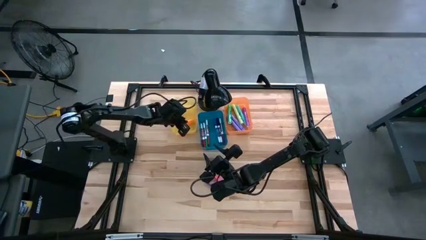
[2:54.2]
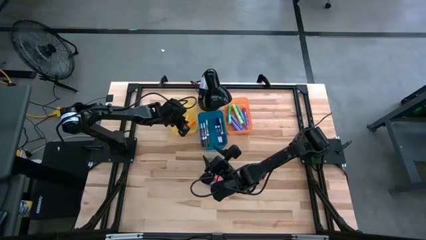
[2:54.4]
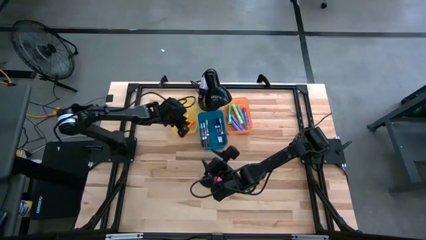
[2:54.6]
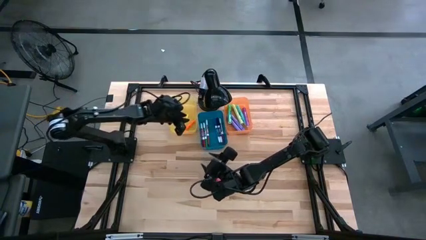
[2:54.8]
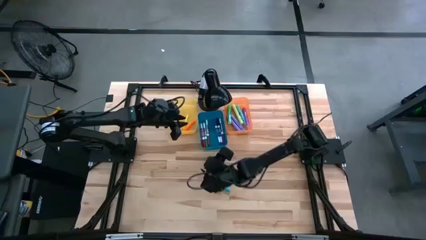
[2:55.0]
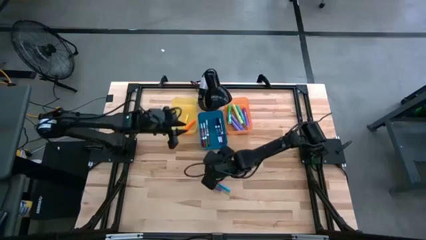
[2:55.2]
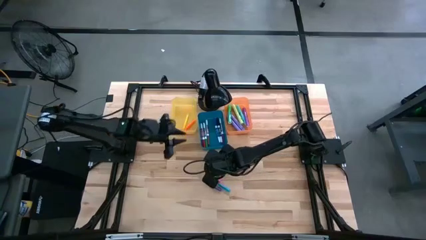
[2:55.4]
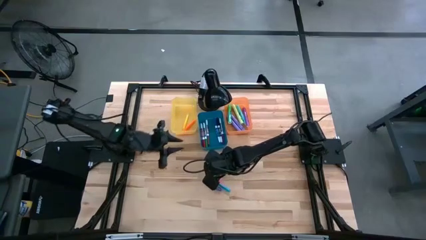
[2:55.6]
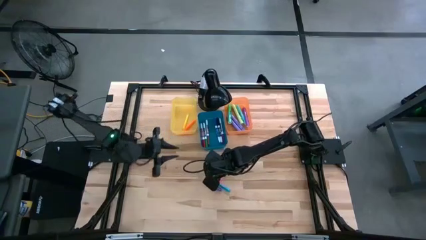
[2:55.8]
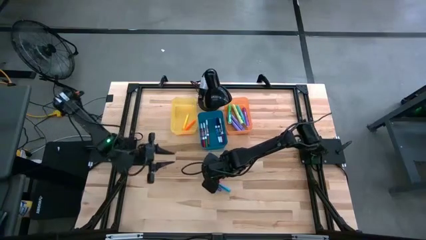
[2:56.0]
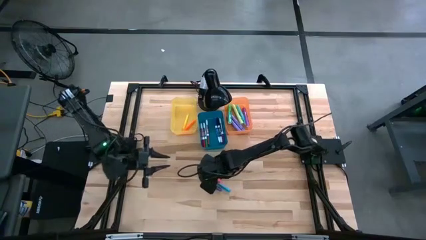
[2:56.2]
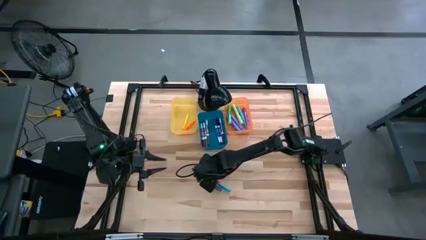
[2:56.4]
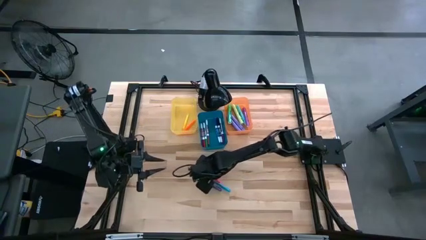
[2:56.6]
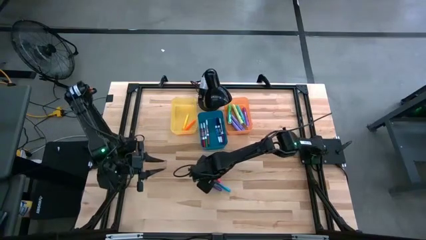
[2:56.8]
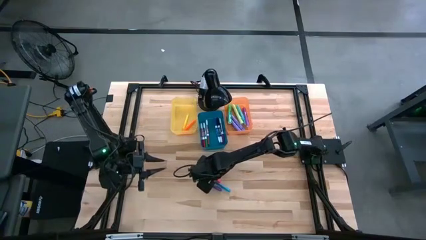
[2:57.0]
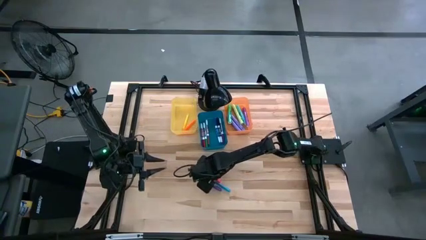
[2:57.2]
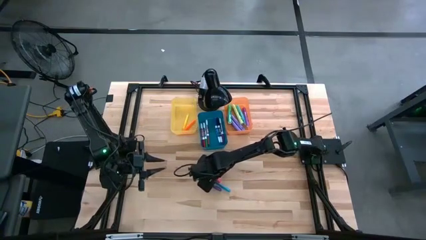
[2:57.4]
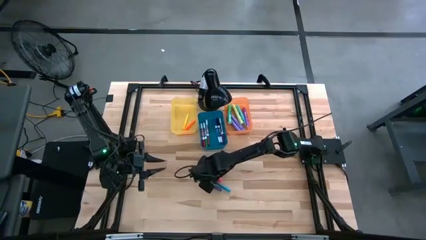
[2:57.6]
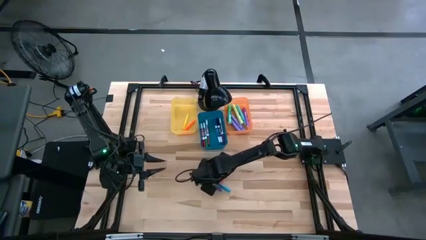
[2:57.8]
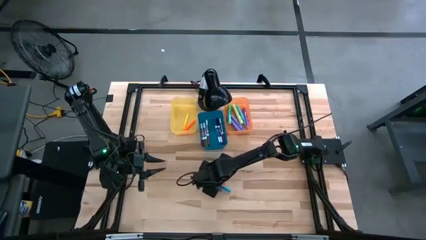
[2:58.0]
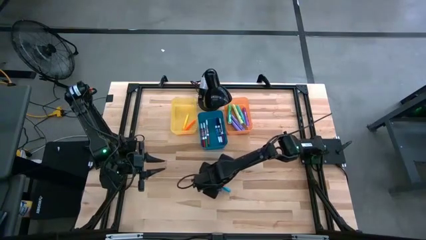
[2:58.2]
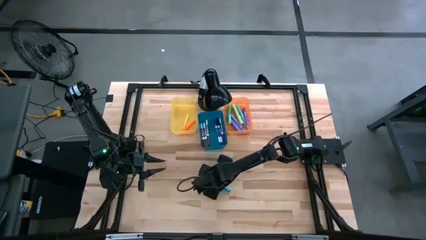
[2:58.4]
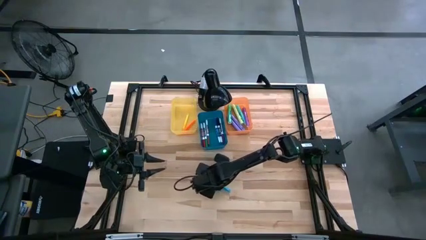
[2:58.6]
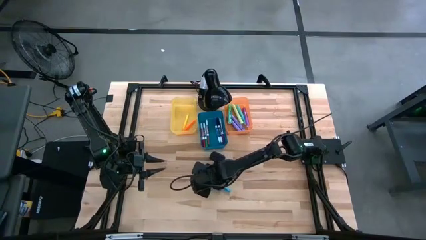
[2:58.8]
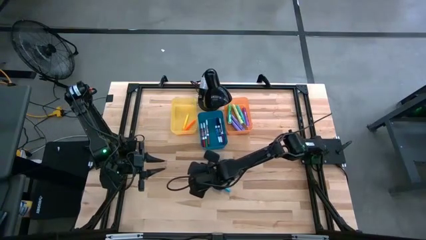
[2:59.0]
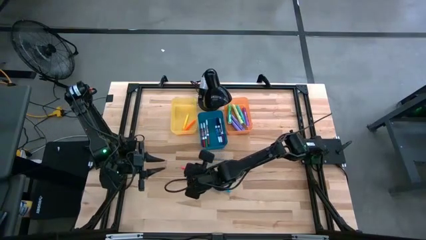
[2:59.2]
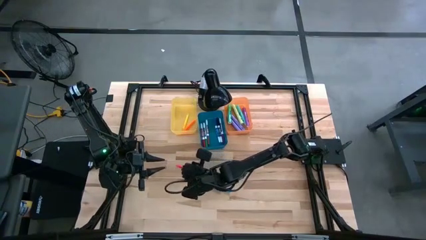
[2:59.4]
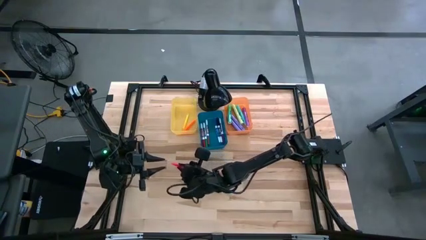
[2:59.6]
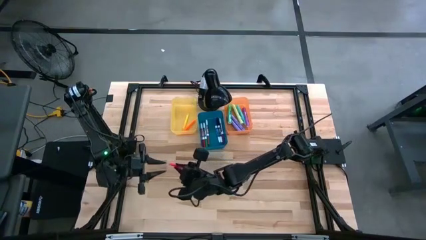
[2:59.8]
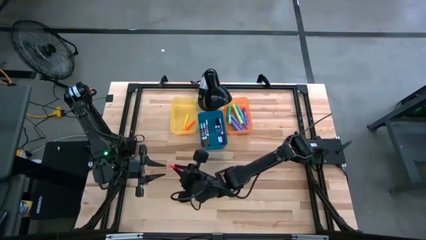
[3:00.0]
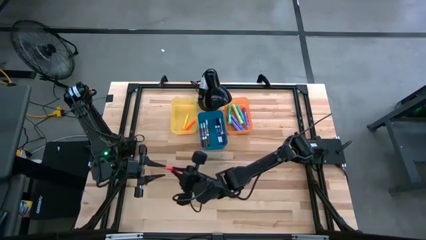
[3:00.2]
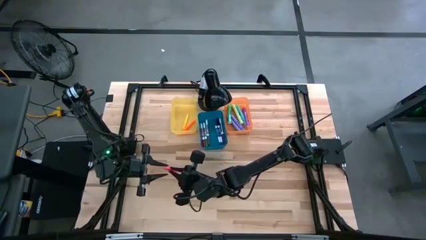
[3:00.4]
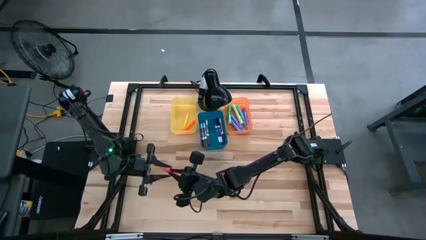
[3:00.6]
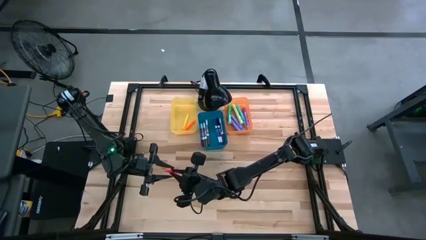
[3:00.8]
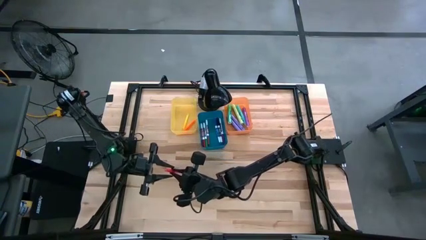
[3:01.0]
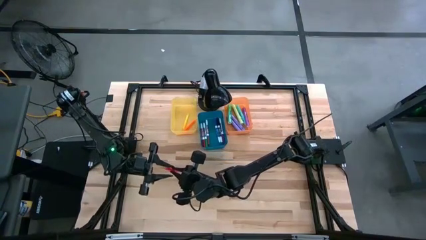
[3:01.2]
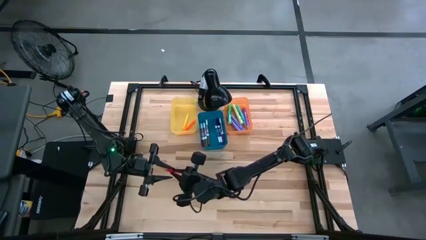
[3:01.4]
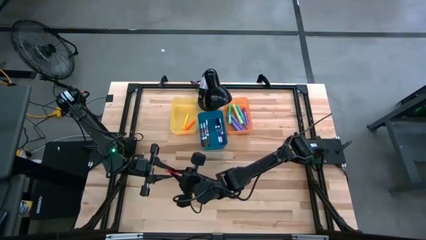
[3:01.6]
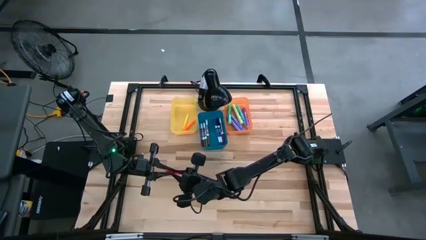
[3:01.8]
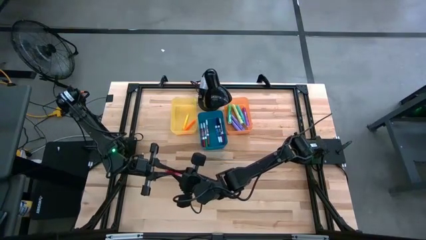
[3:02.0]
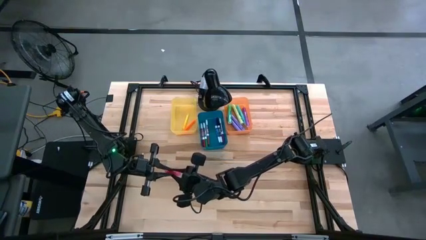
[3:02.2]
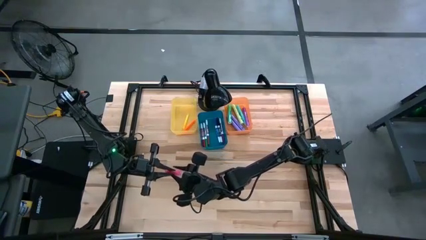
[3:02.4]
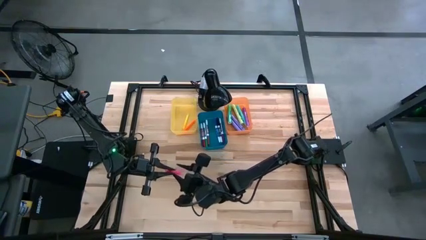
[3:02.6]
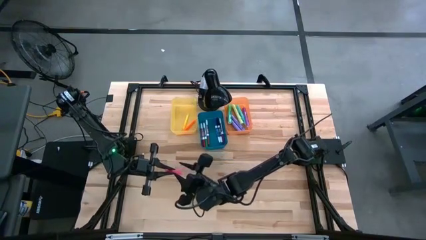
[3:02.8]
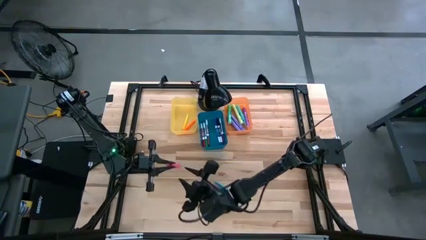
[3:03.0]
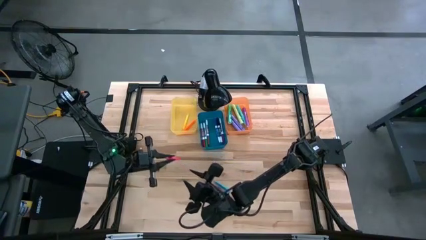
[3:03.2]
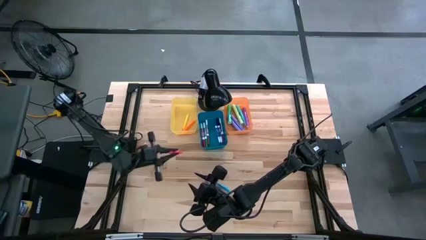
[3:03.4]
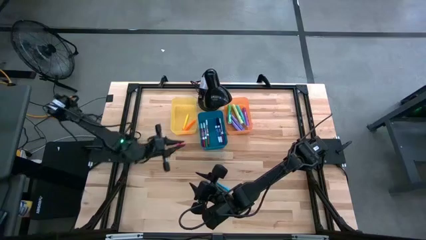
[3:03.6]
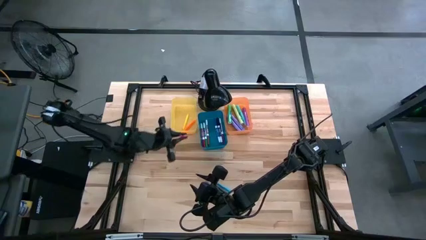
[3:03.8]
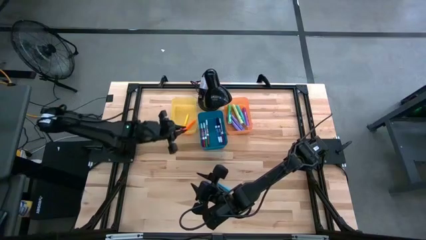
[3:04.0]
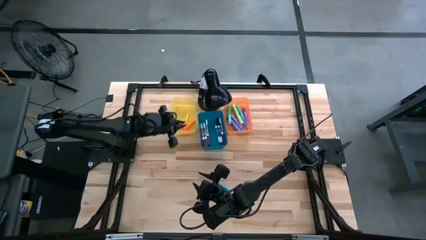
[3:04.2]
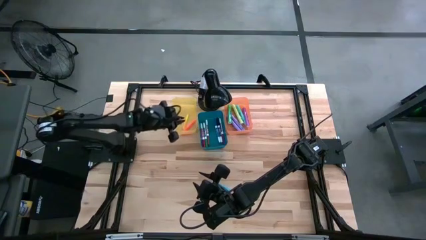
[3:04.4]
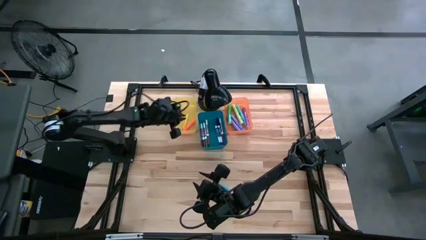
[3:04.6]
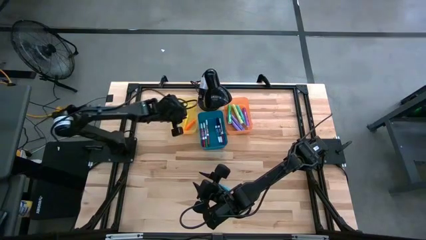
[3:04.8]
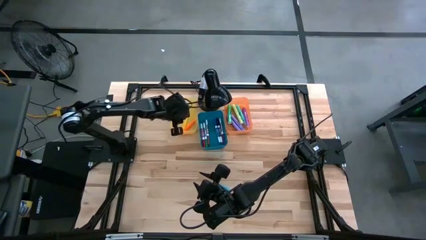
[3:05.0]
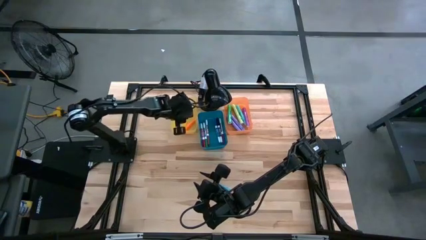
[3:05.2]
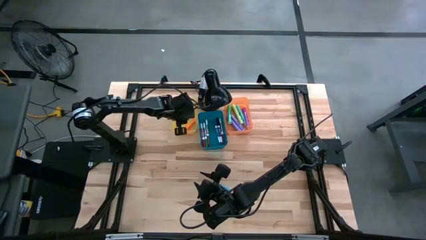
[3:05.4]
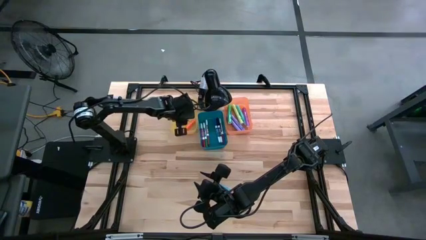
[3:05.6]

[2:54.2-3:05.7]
Task: Pick & Place Markers
Put the pink mini marker into the yellow bin

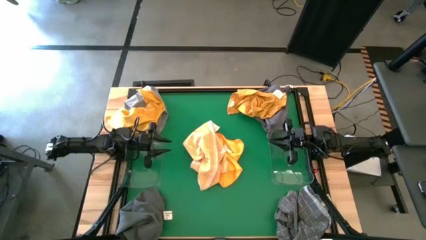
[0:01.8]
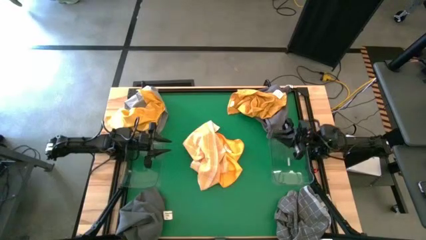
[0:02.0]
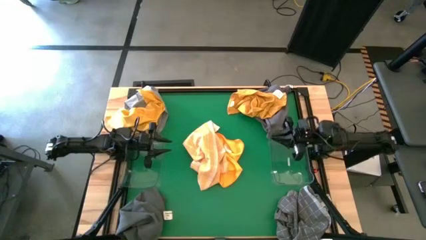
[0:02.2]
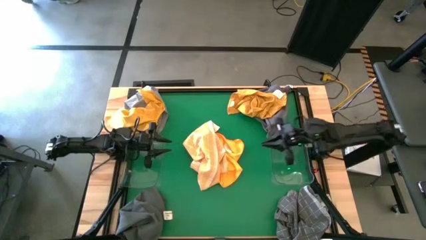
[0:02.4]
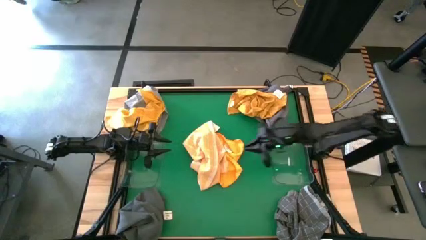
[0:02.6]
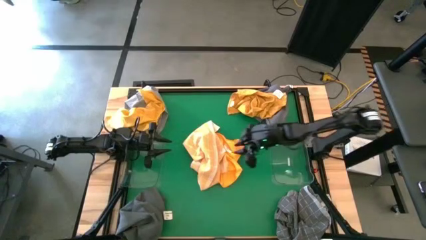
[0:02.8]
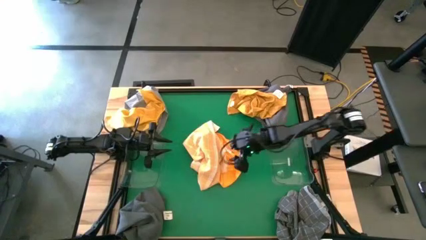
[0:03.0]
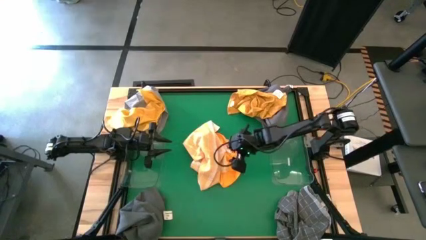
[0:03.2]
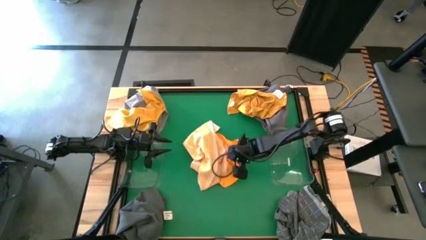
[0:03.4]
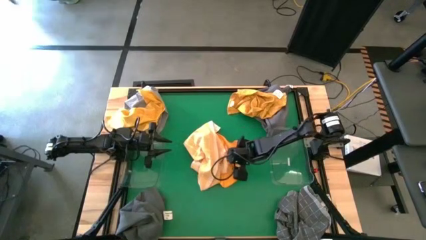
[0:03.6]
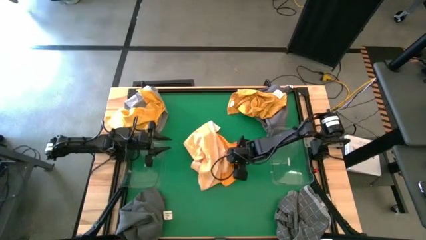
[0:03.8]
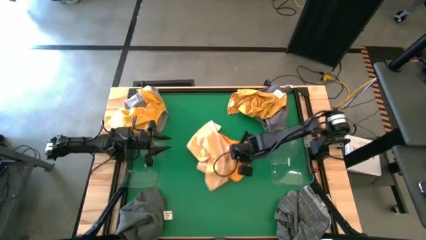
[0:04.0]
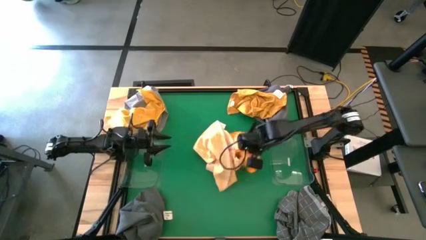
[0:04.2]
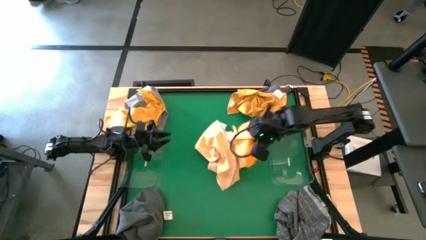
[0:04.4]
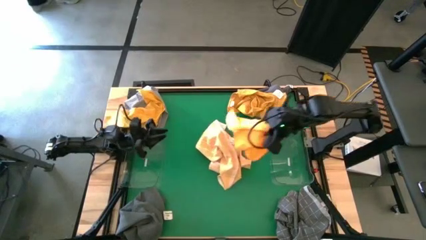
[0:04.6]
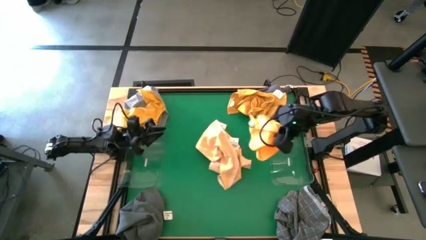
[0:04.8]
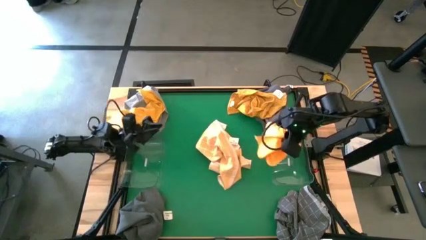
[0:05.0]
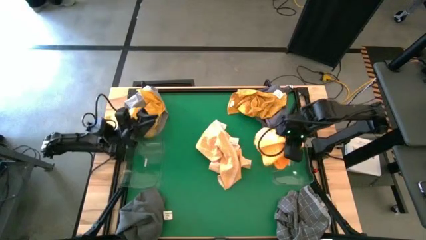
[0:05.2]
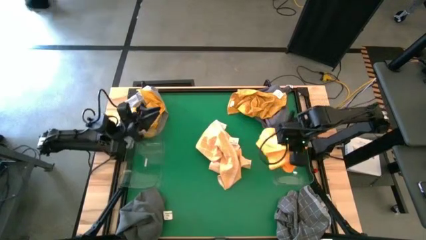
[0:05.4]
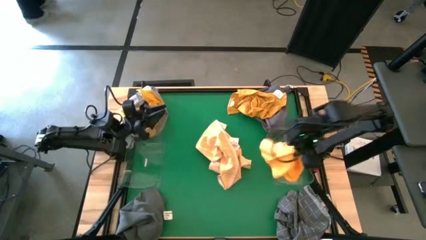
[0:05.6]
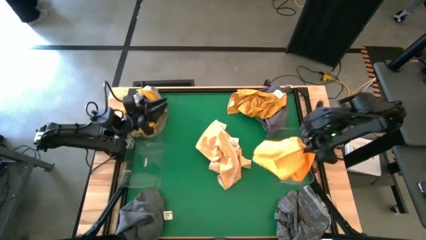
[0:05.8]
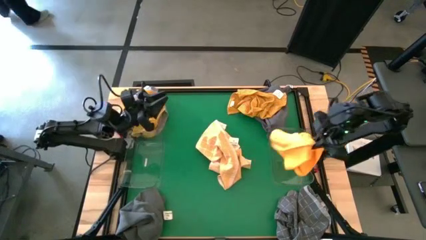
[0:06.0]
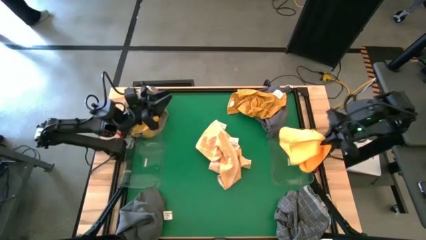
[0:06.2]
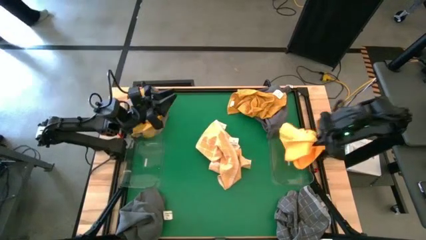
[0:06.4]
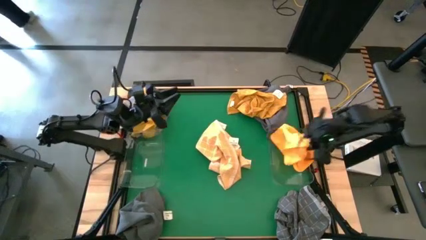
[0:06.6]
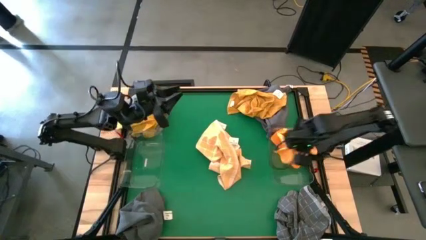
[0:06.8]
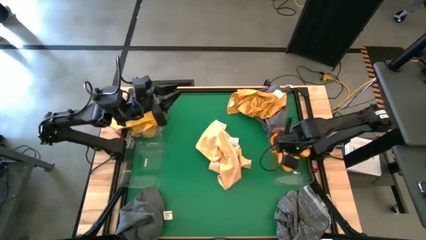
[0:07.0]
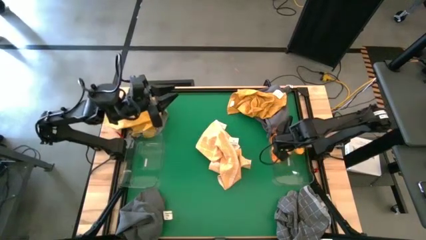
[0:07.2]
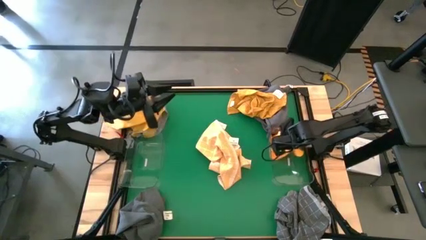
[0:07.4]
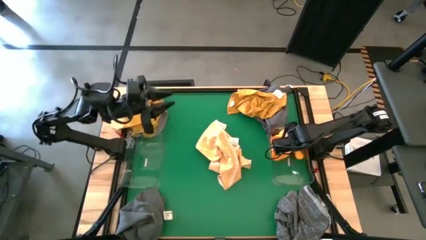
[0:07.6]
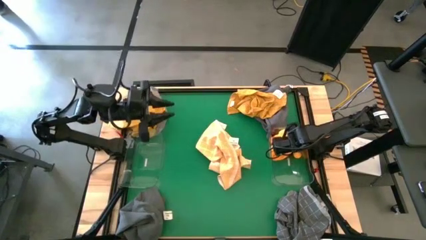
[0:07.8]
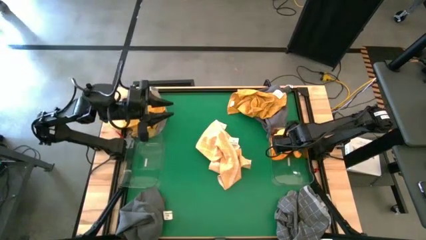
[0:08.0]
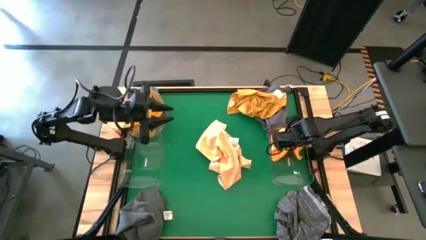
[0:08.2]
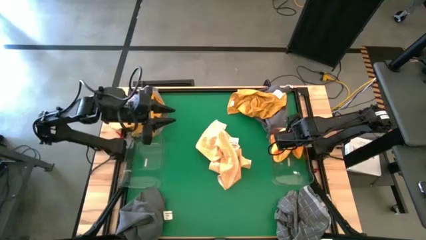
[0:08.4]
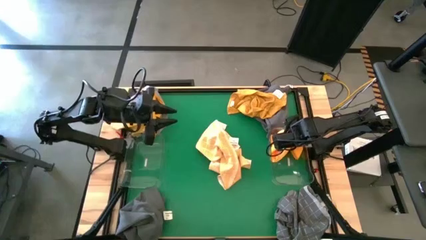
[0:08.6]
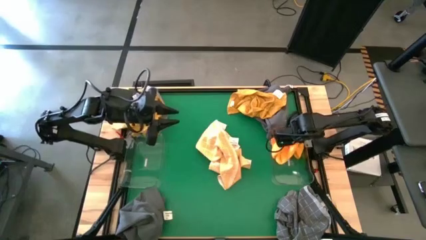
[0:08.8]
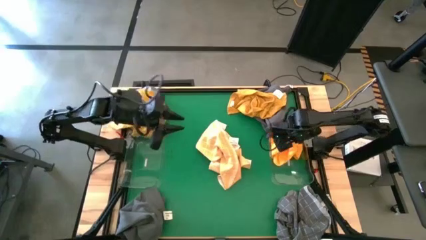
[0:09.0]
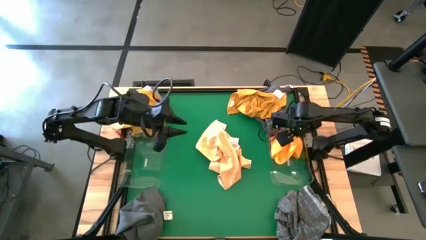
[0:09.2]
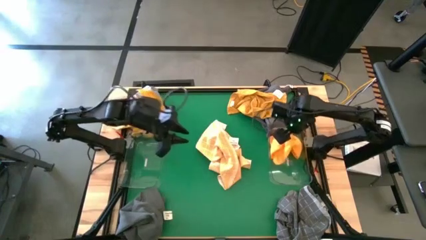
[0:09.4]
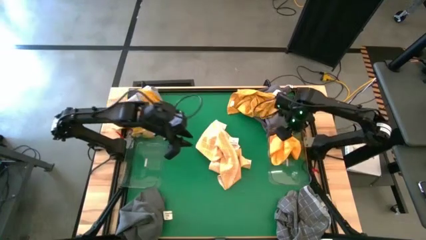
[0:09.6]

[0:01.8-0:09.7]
Task: Sort microfiber towel by color & place in baskets
Put the middle orange microfiber towel into the right transparent bin
